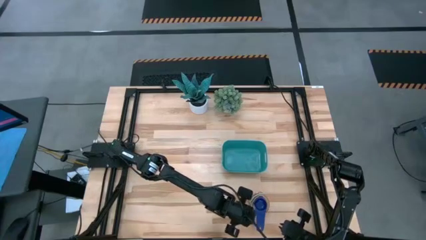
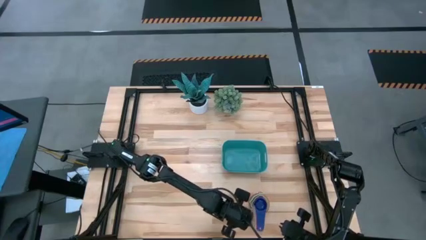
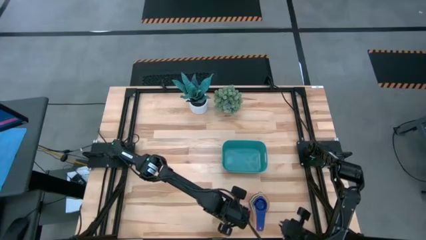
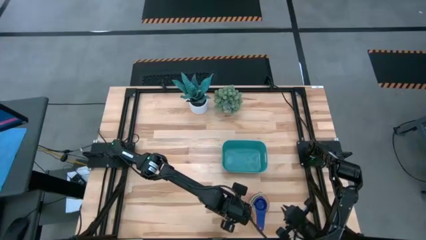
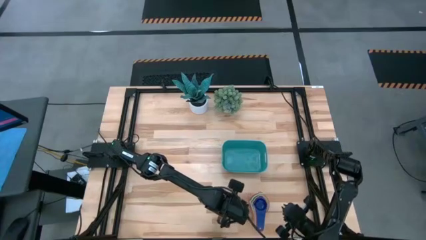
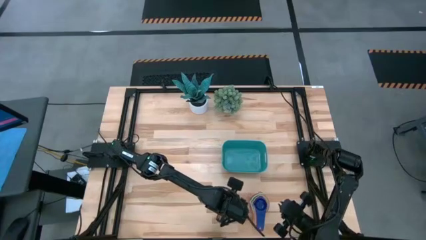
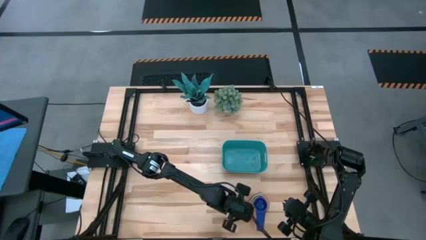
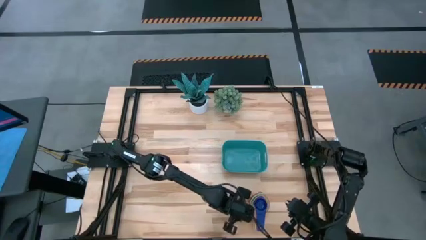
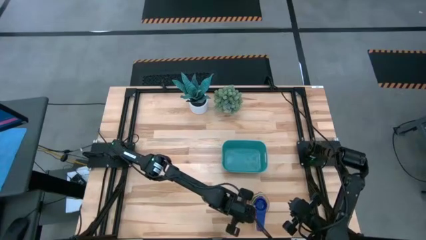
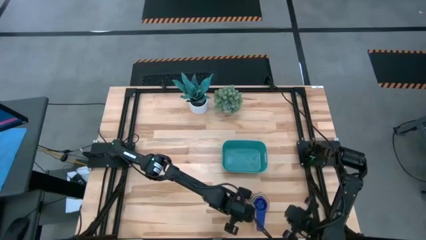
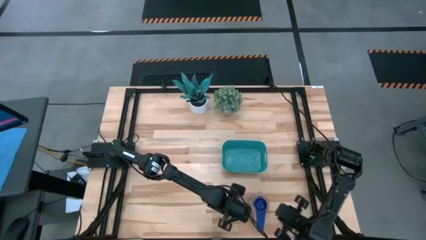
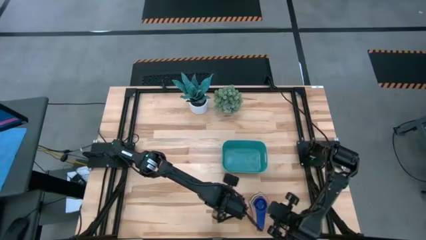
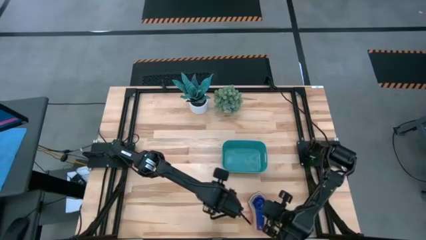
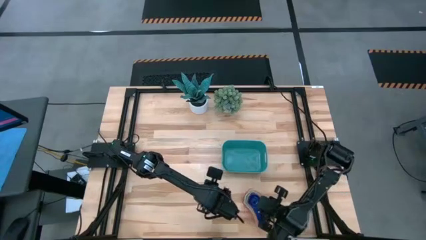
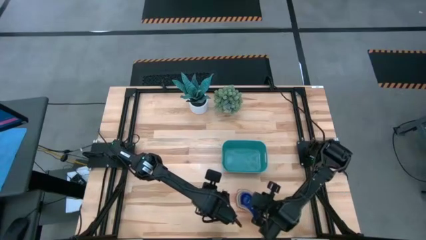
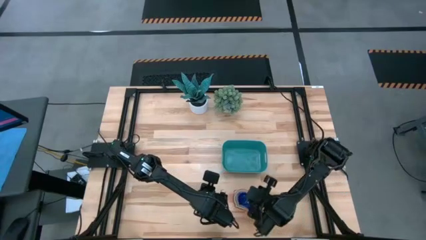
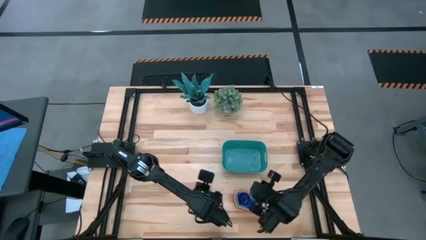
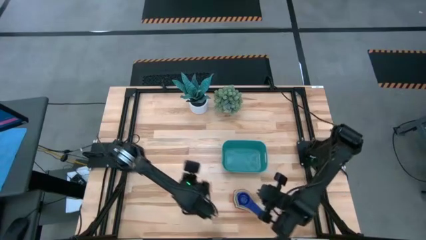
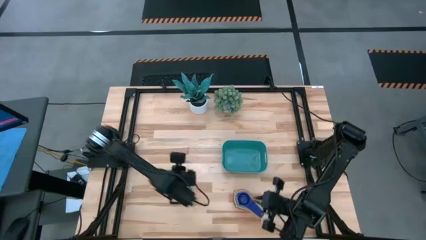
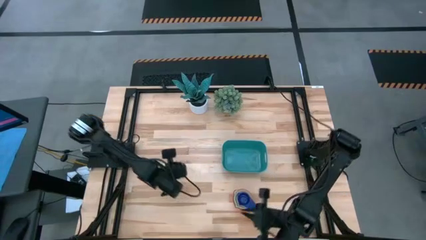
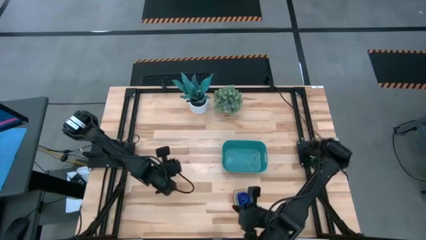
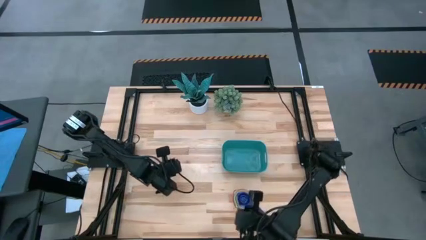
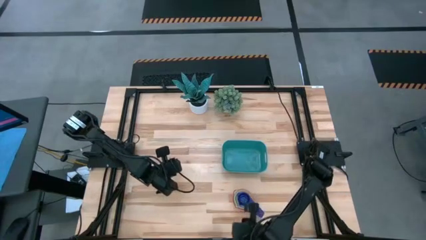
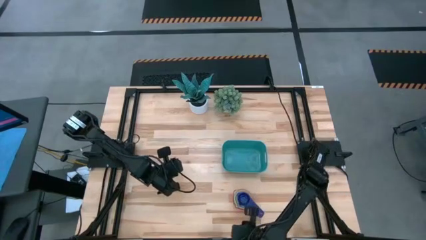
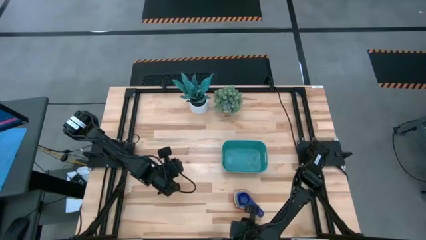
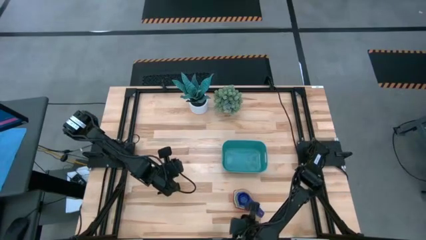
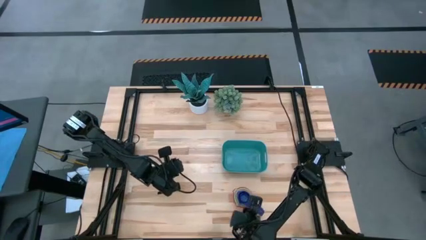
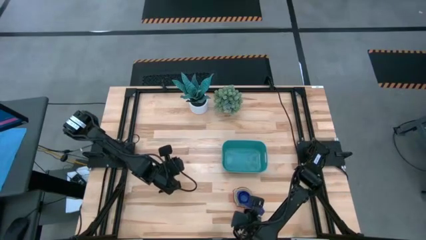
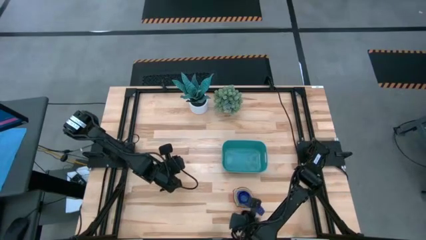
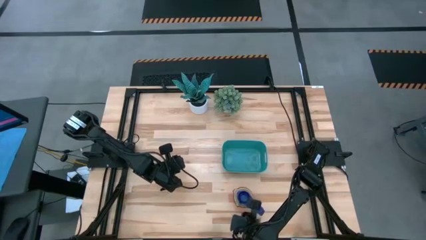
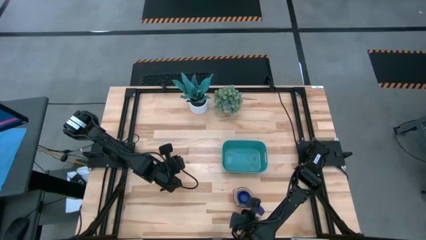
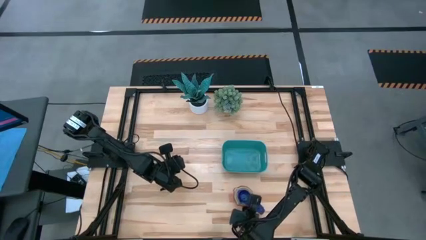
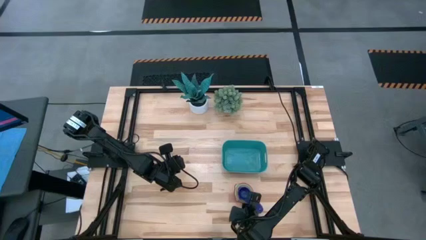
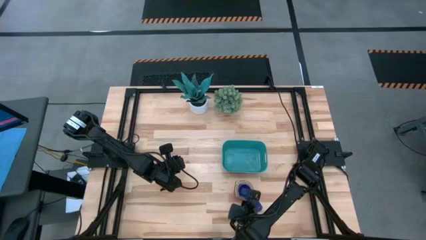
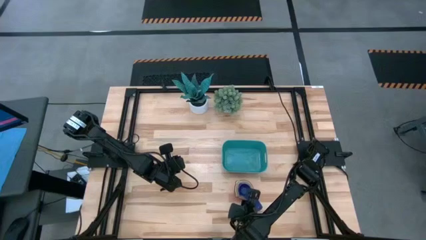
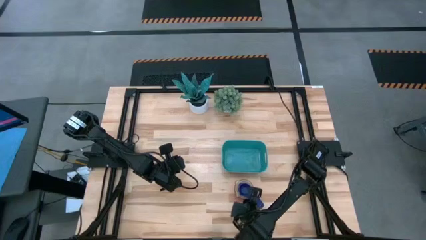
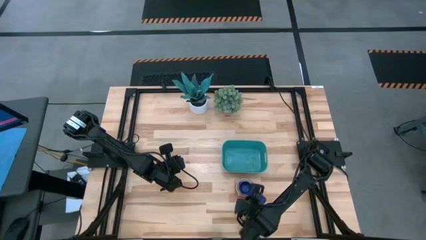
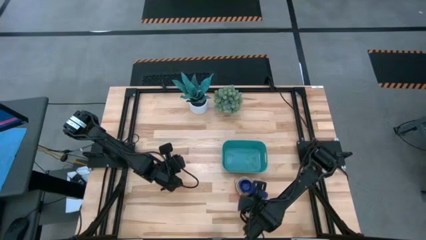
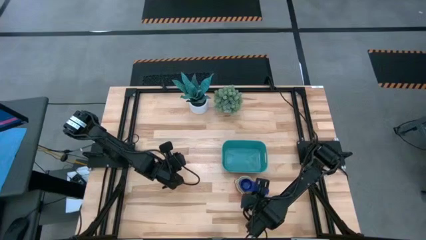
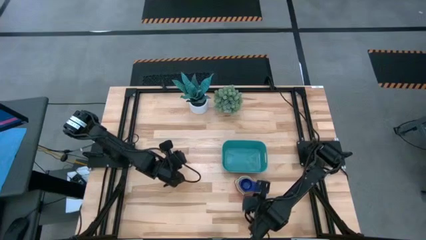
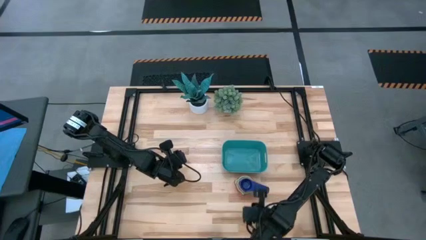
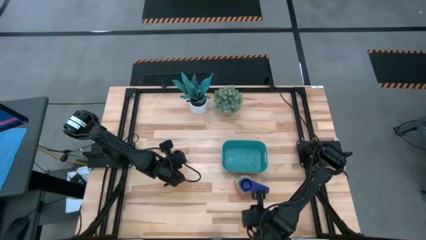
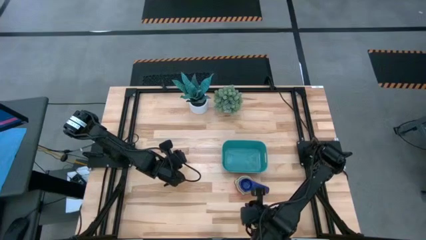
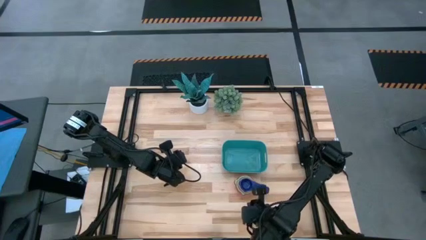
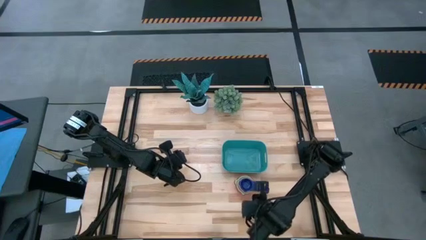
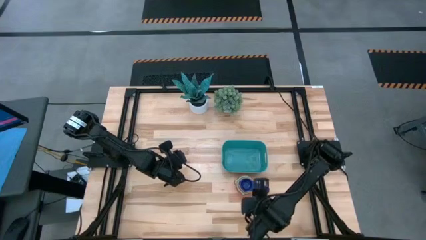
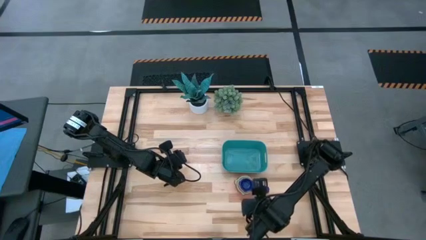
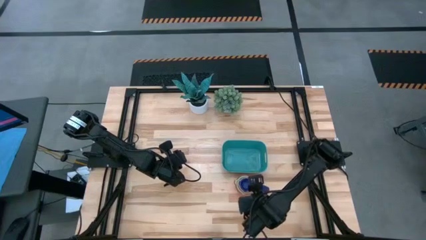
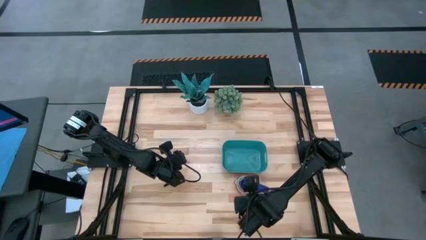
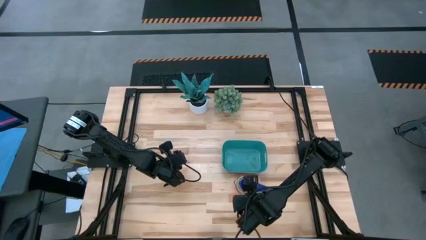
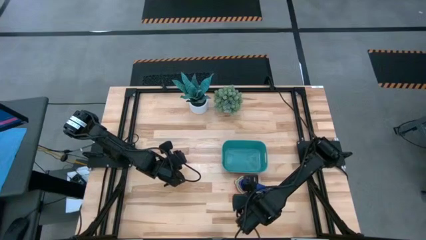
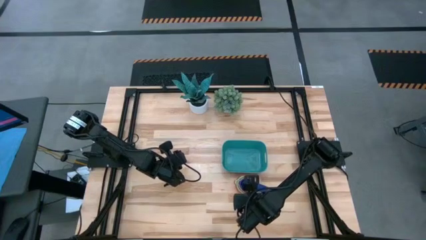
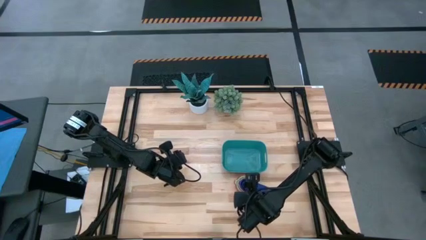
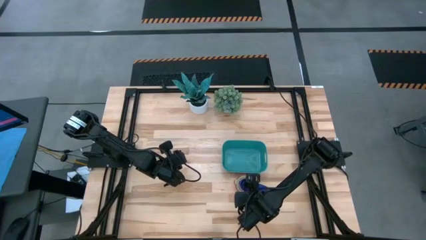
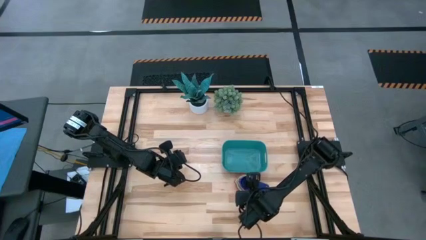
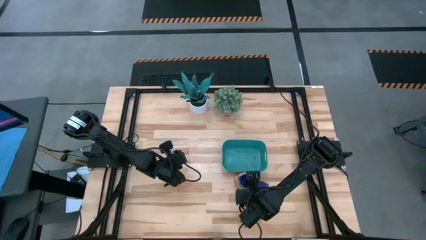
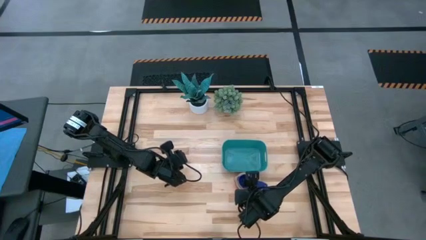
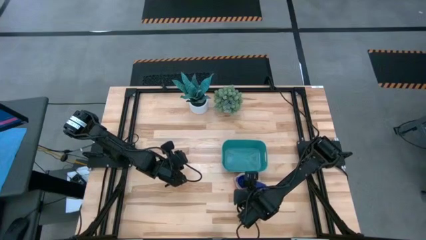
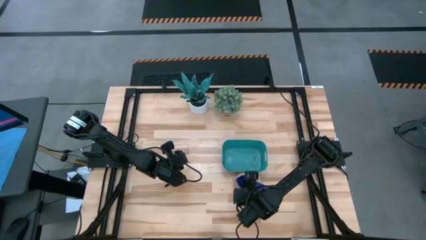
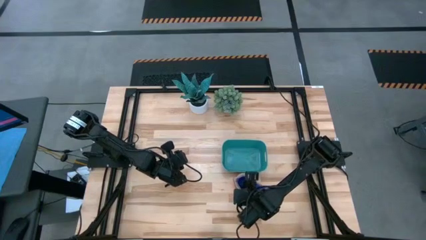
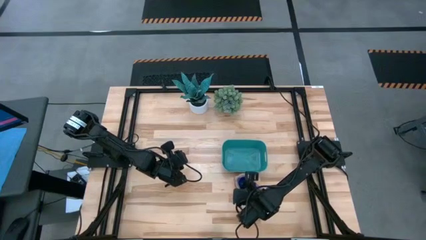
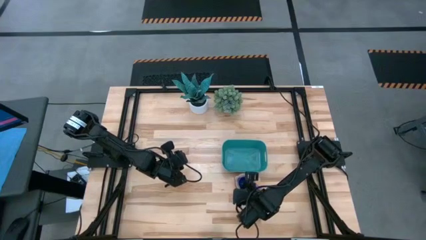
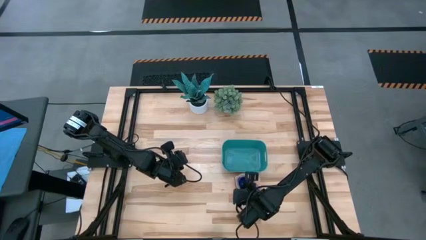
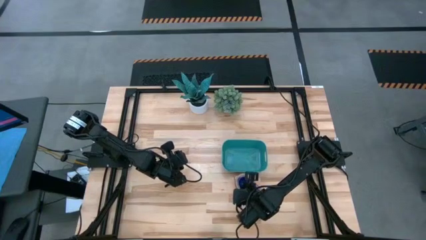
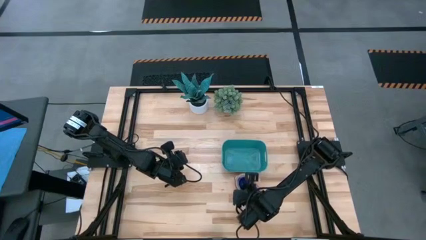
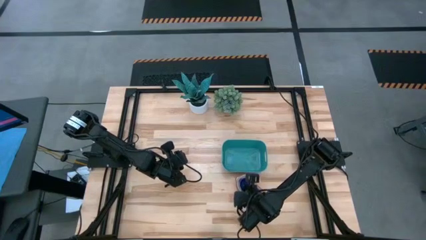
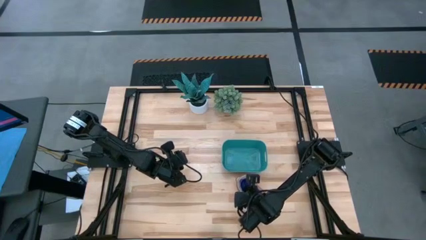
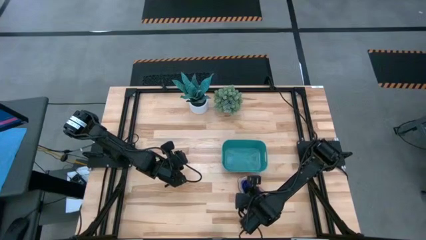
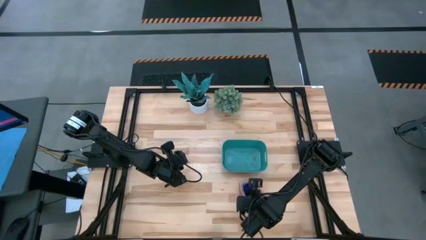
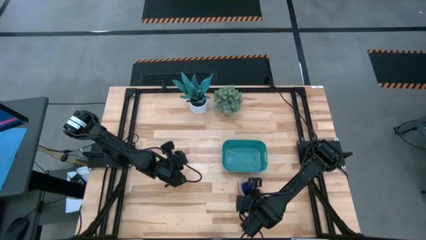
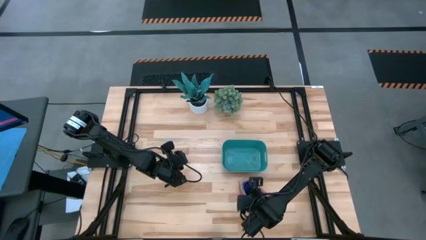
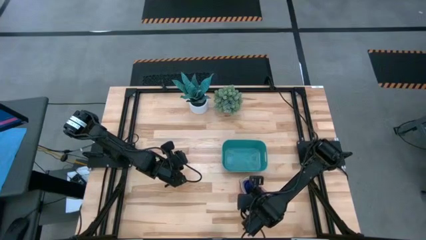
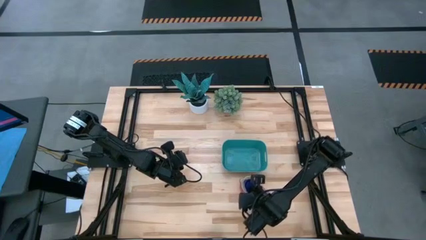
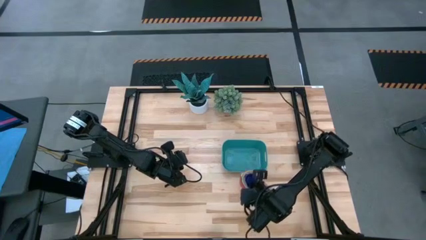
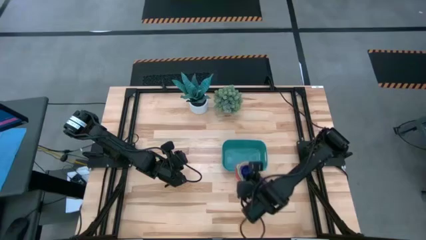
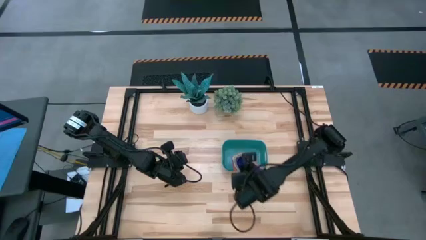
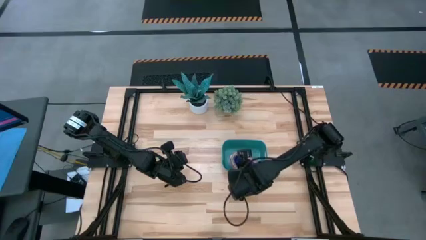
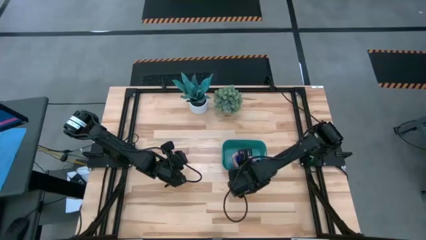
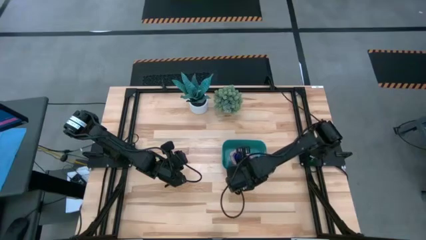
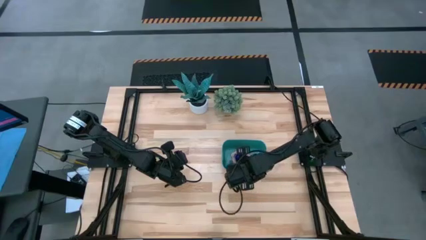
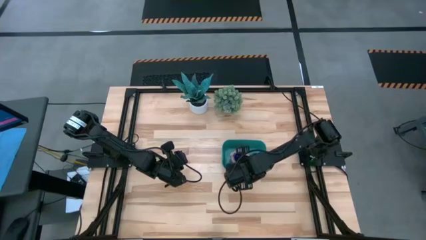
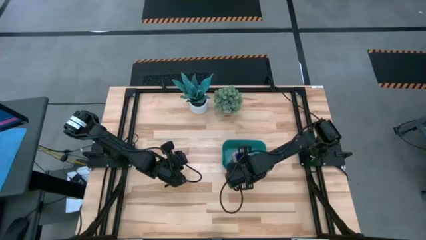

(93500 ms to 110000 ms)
Task: Nest measuring cups in basket
Put the nested measuring cups into the green bin
